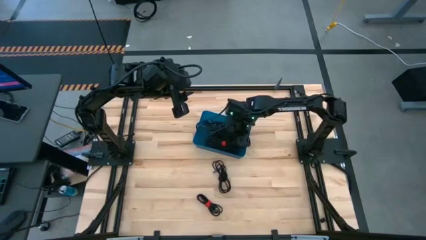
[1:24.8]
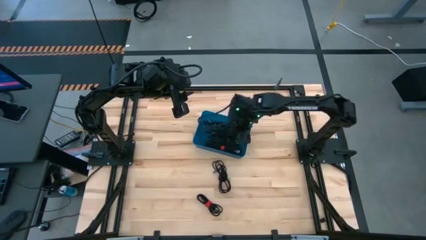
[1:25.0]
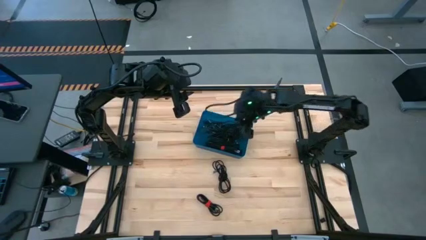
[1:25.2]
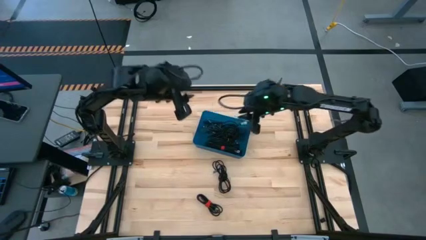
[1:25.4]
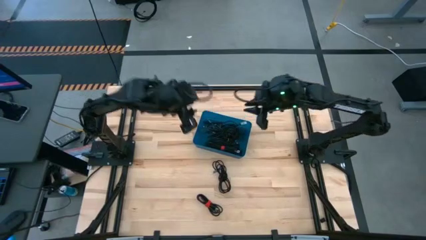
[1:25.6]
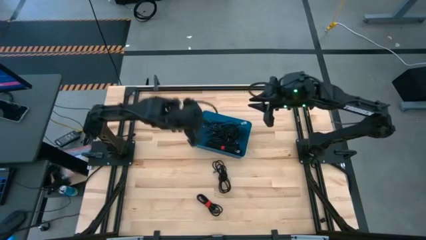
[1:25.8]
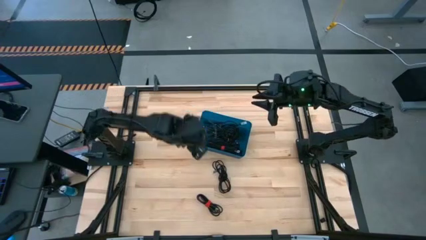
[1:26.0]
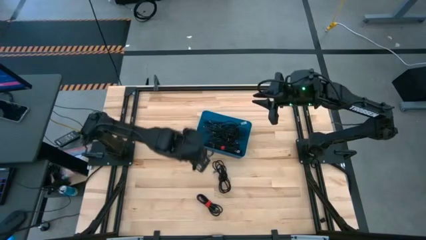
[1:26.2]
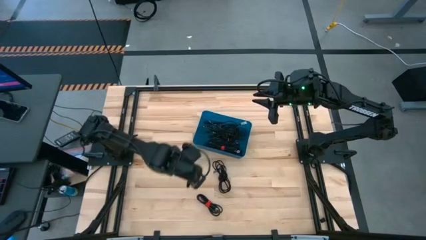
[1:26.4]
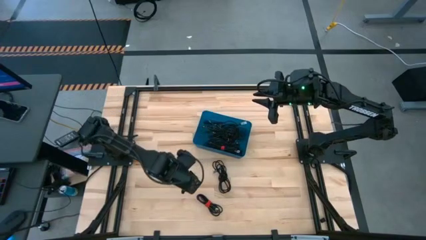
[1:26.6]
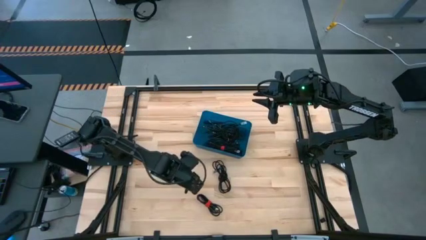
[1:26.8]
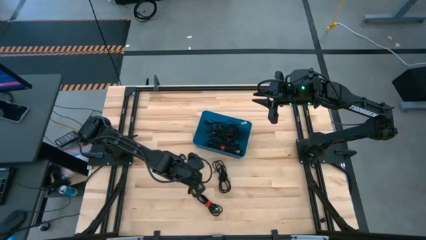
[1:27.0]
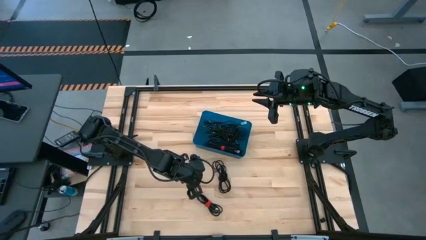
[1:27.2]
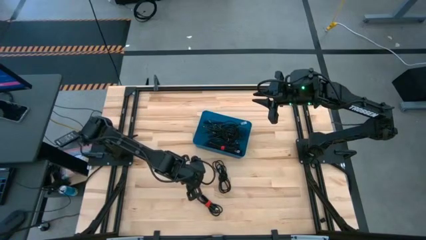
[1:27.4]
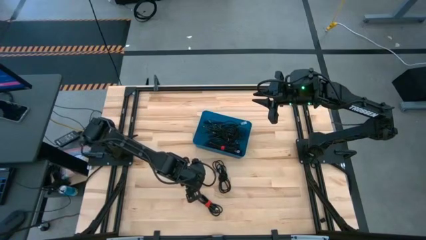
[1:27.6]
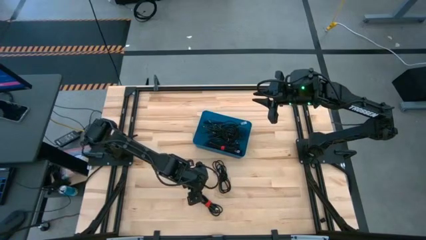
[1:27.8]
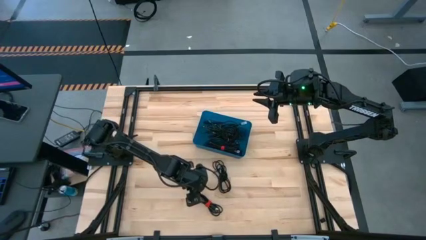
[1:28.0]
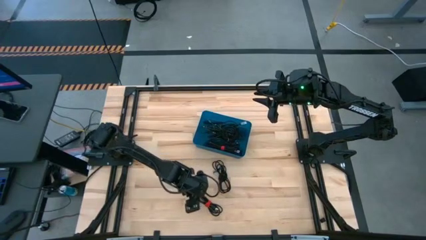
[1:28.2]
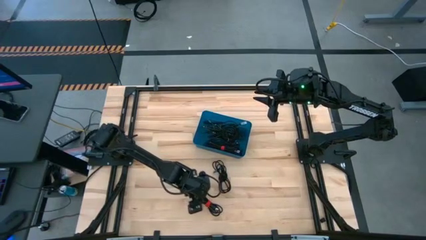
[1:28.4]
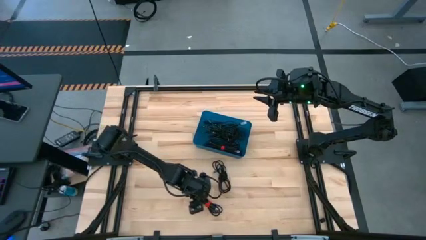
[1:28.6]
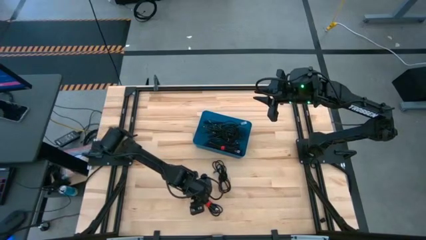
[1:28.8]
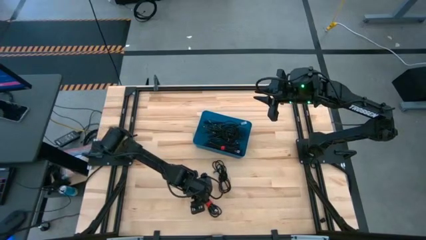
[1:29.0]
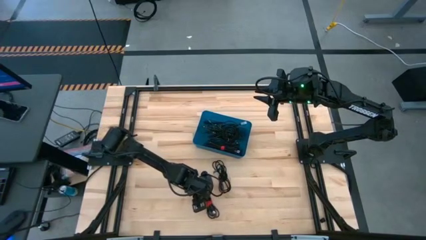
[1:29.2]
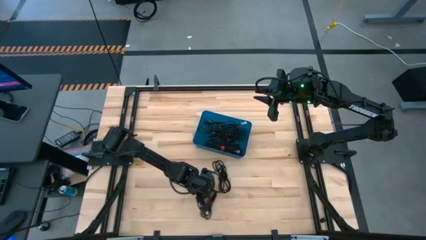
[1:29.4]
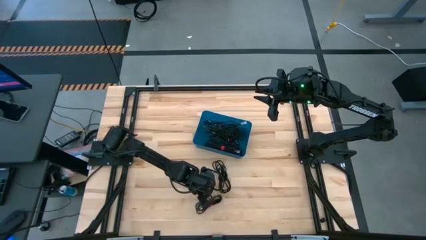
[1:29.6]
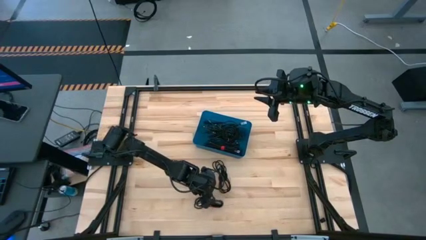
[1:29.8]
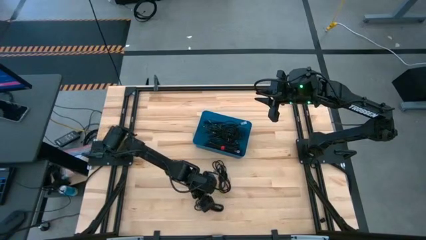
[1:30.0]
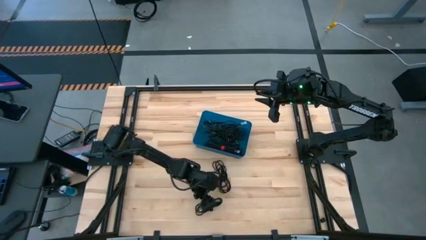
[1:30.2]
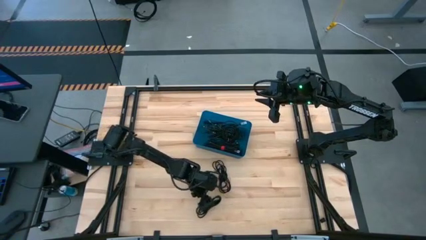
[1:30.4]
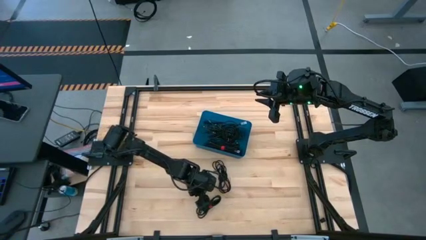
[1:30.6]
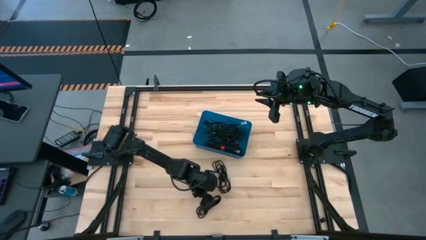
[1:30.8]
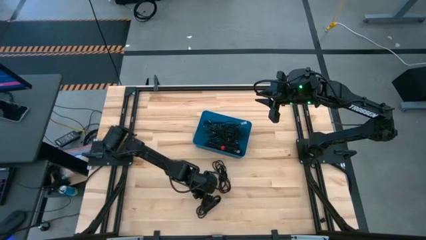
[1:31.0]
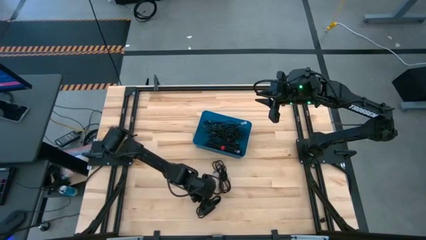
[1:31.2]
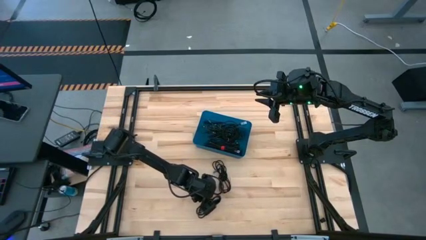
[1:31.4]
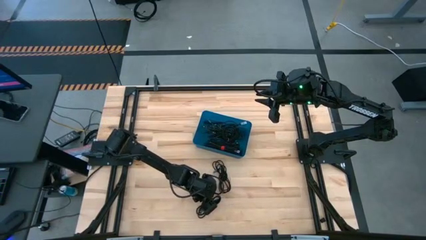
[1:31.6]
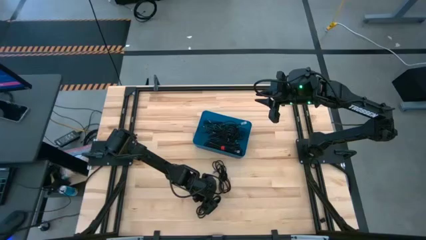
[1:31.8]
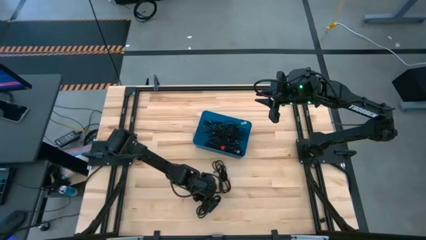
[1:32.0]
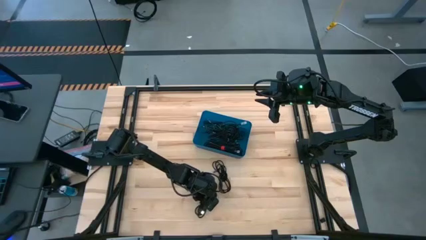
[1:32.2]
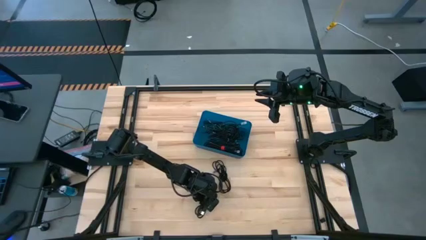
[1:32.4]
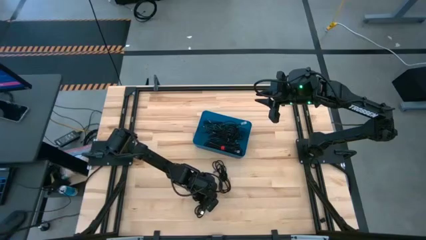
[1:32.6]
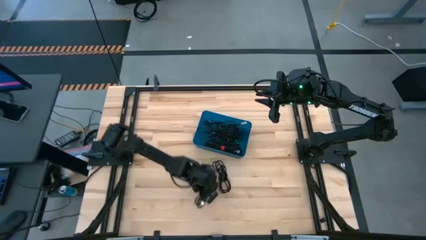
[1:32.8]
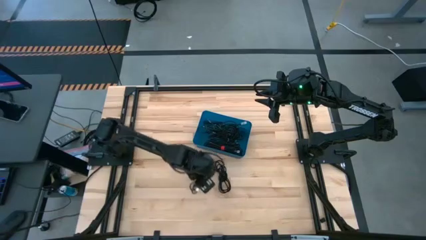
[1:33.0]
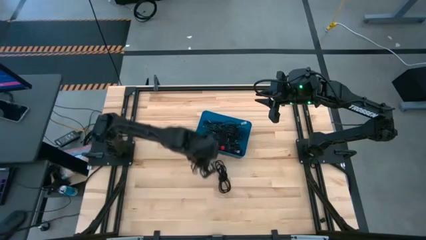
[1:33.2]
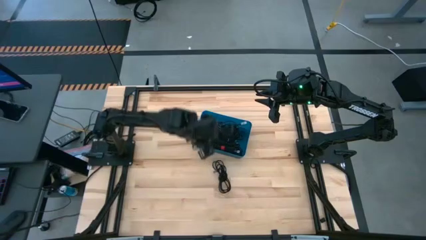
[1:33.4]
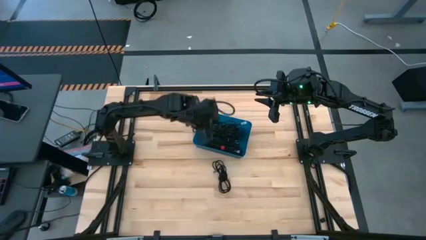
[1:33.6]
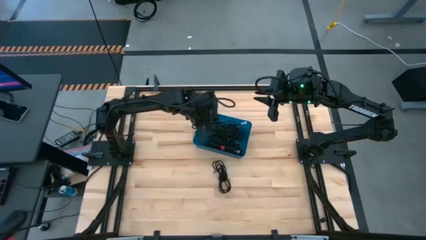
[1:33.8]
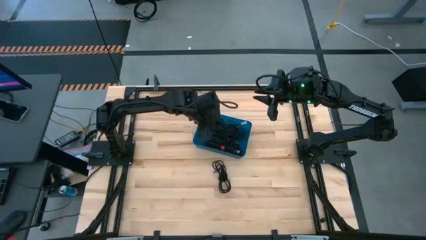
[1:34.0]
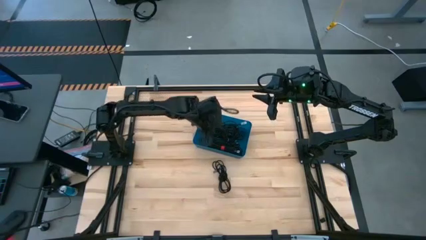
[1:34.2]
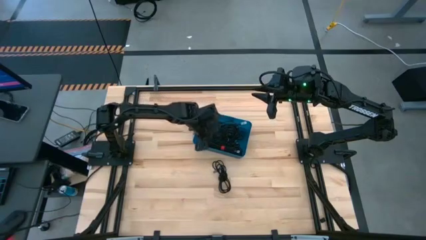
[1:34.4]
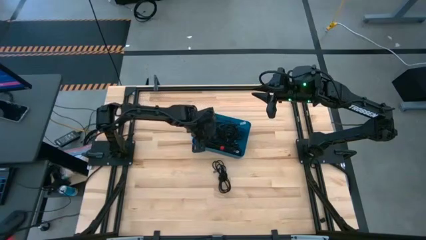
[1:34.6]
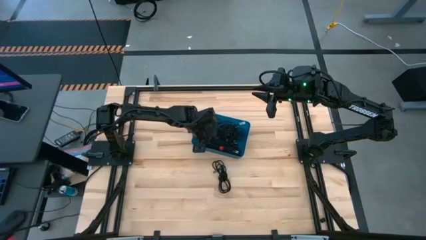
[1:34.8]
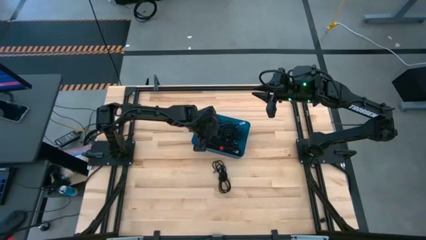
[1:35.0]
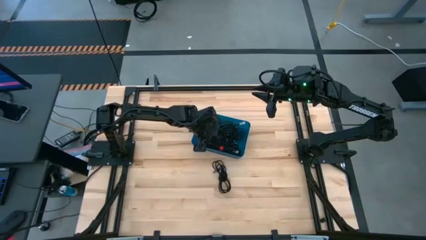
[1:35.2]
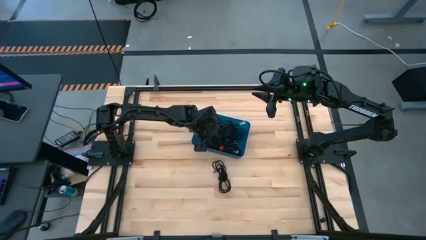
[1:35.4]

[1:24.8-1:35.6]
Task: Pick and place USB-C Cables
Put the black charger cable into the blue bin

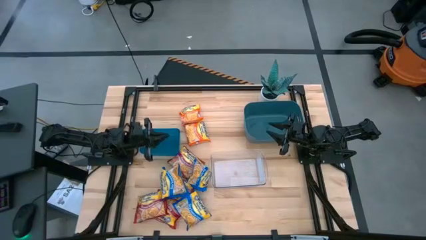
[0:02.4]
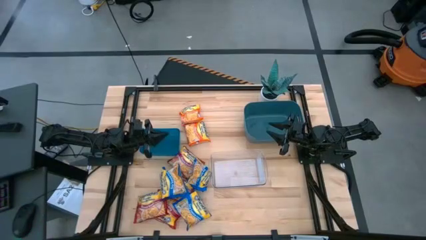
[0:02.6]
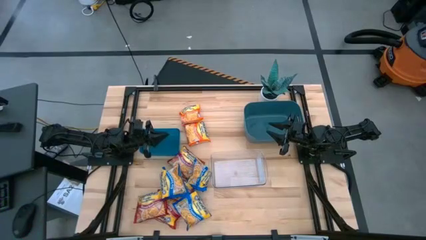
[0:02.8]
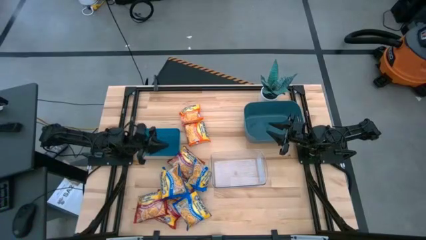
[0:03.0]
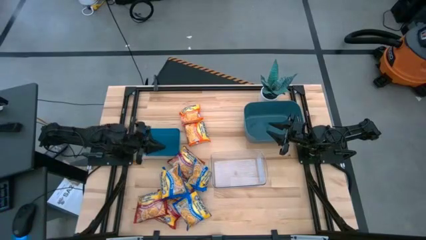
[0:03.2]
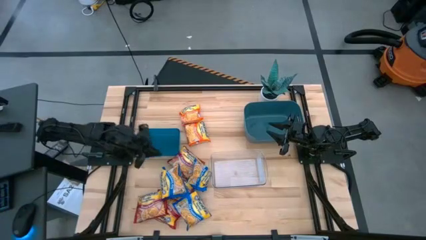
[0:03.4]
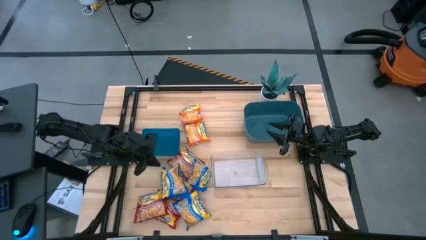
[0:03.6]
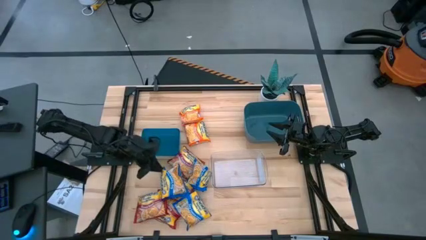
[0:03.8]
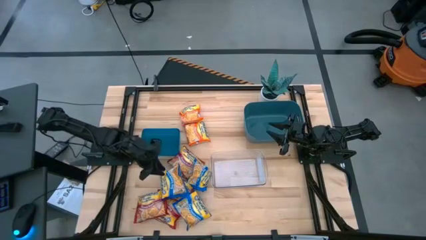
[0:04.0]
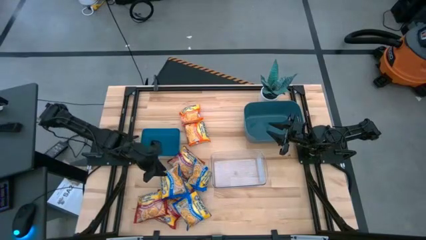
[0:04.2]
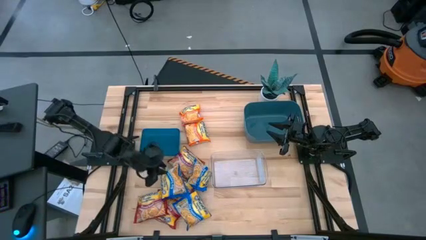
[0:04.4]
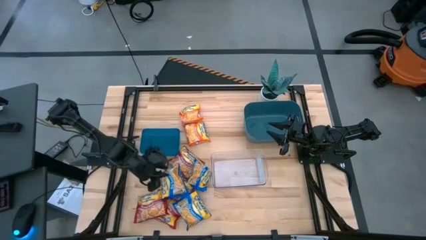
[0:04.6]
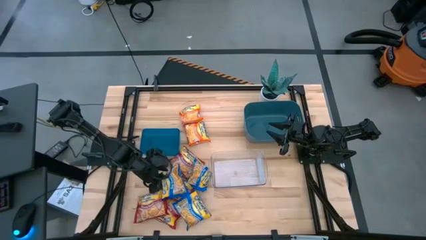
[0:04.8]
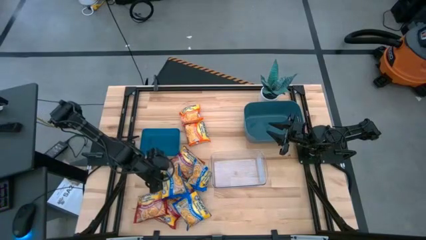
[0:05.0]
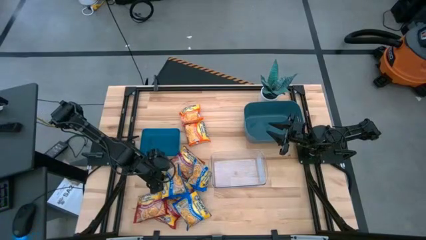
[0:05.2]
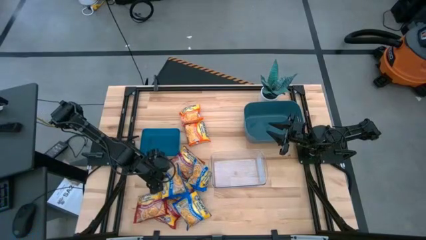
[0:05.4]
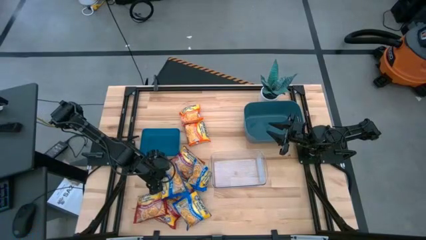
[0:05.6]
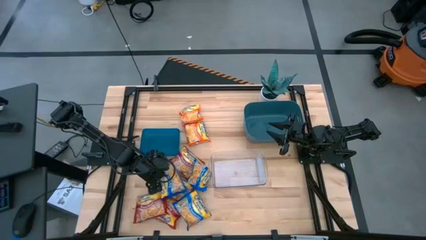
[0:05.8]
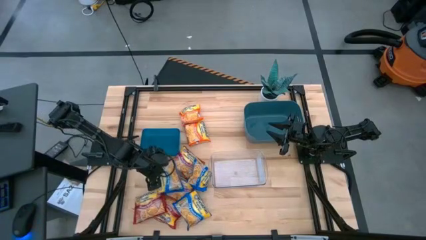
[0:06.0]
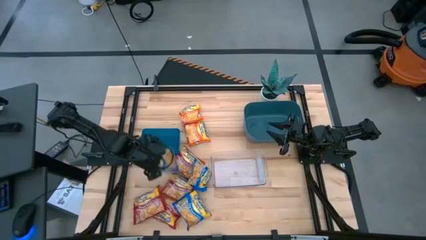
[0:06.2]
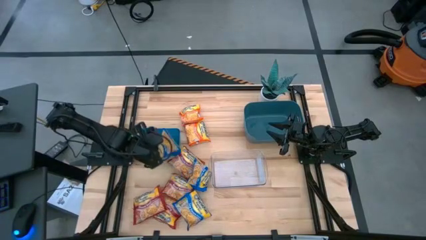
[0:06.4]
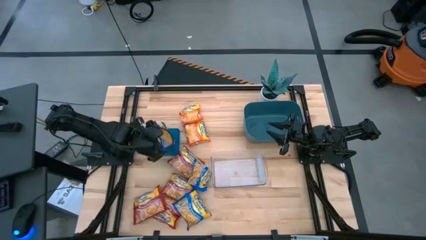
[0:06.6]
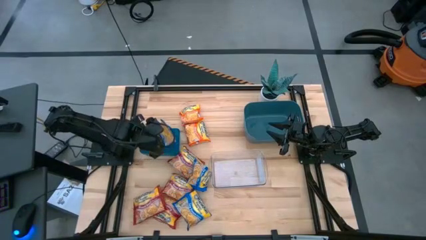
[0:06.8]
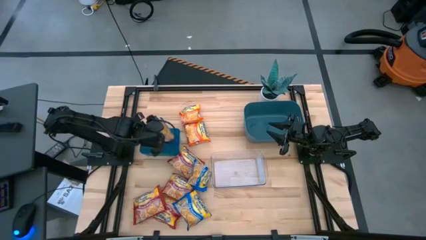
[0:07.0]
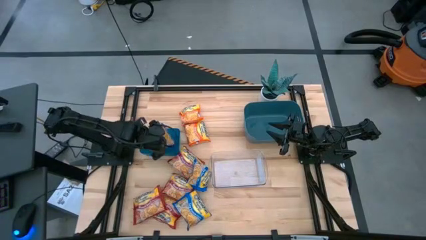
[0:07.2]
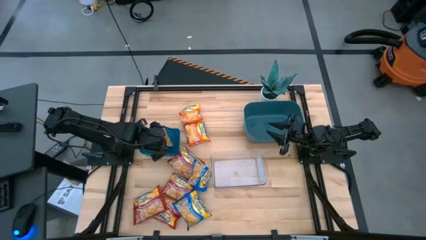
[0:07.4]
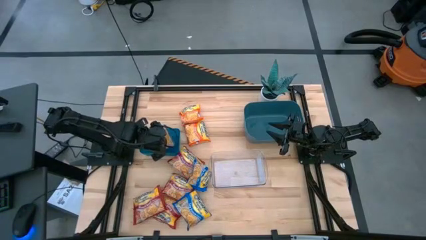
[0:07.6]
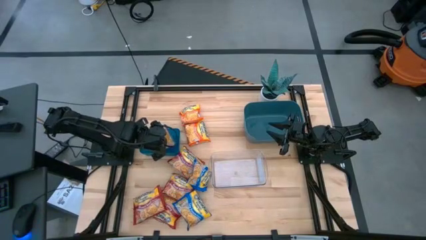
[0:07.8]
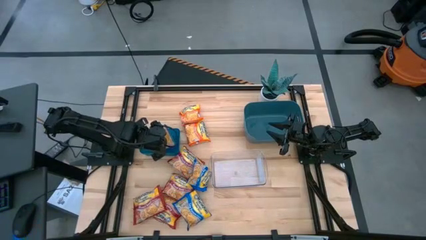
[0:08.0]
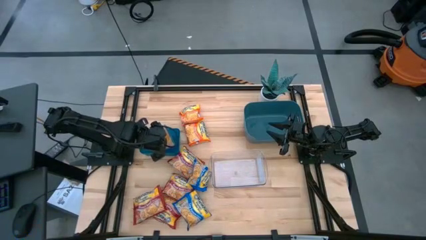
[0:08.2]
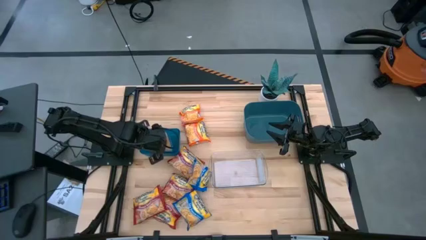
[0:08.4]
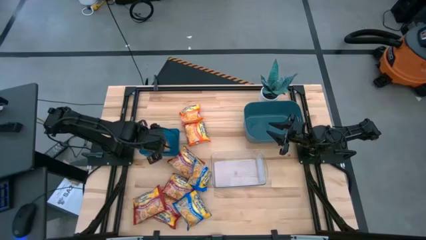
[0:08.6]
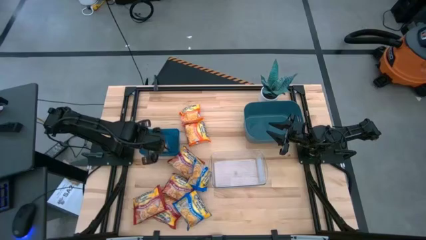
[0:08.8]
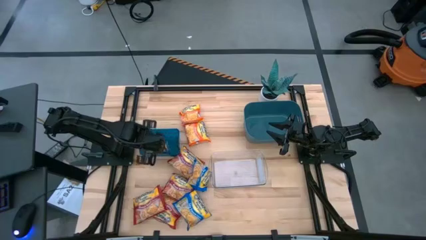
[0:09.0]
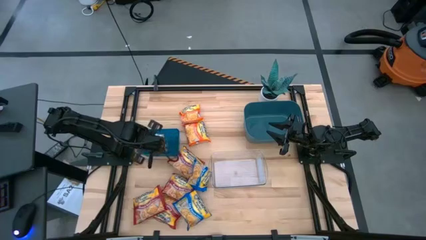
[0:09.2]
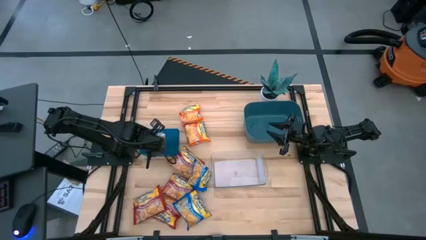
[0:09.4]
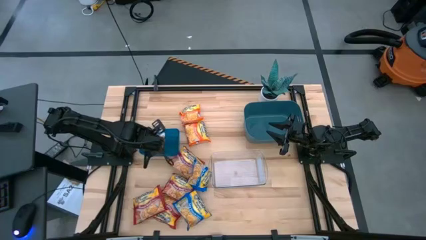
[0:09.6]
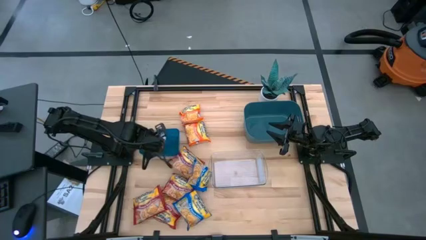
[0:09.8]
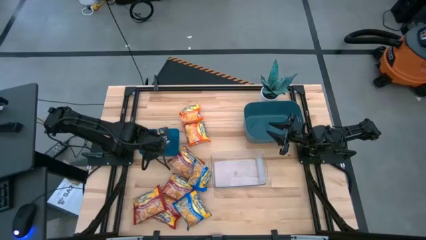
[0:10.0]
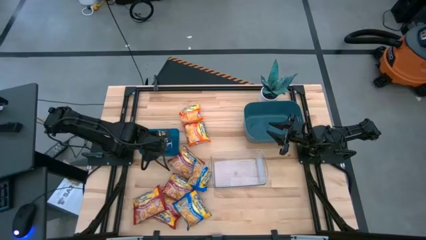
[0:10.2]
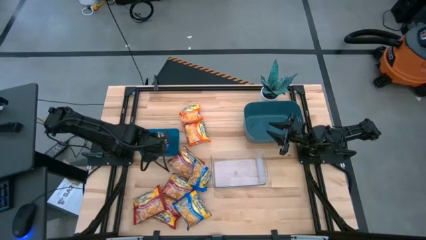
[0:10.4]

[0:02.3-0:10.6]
Task: Sort Maruchan noodles
Put the blue noodle pack into the blue bin
